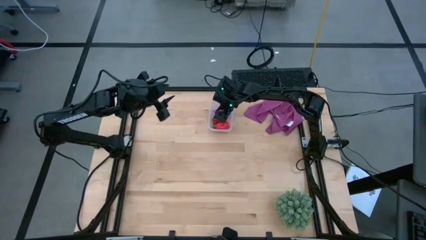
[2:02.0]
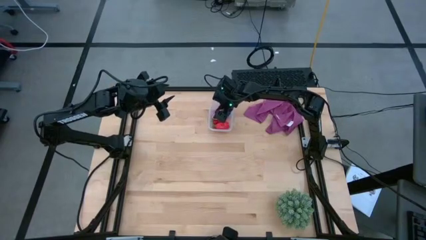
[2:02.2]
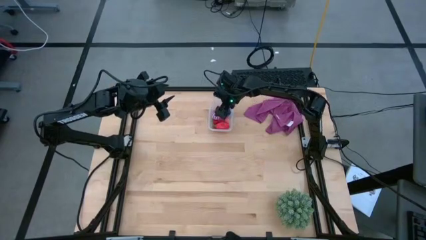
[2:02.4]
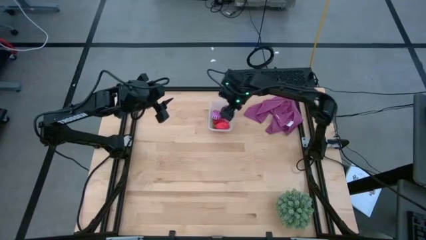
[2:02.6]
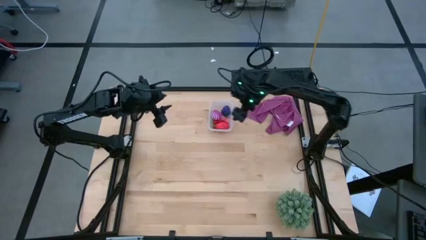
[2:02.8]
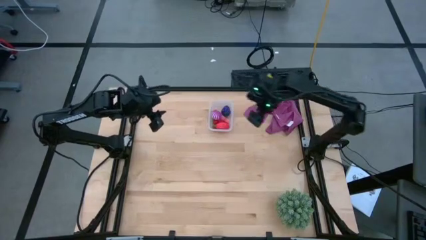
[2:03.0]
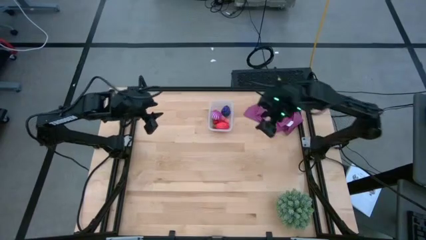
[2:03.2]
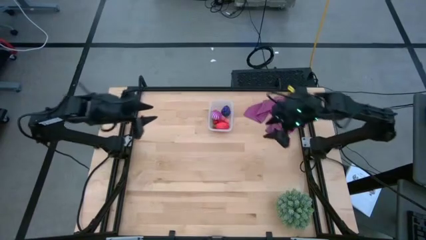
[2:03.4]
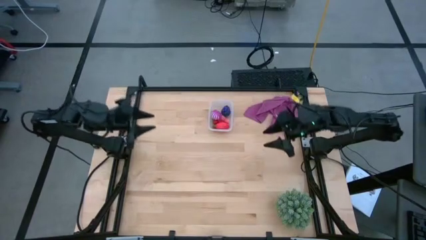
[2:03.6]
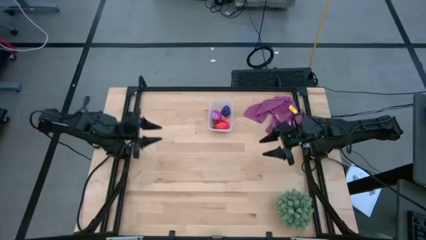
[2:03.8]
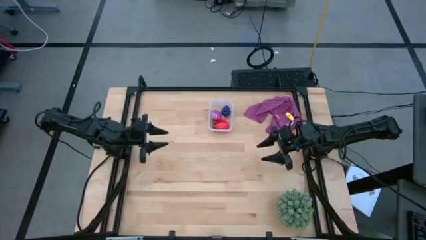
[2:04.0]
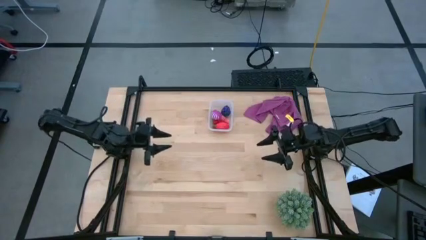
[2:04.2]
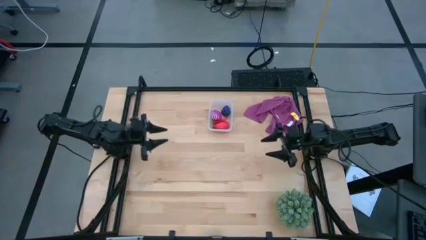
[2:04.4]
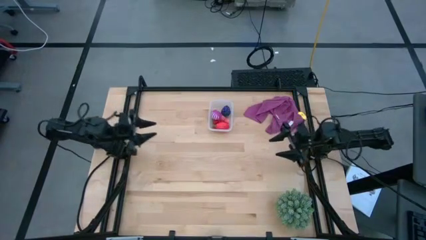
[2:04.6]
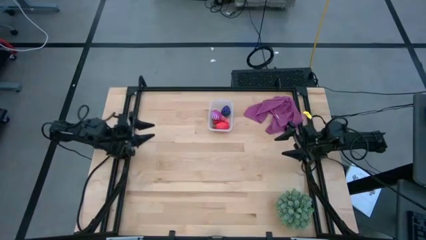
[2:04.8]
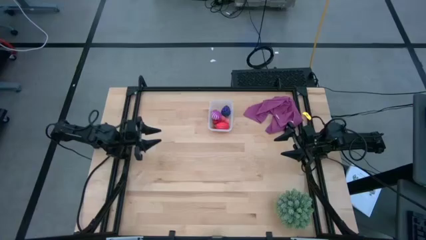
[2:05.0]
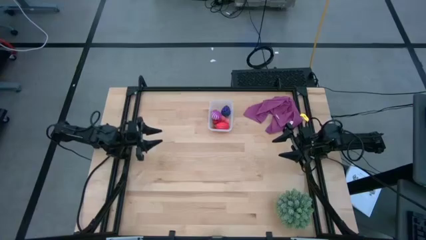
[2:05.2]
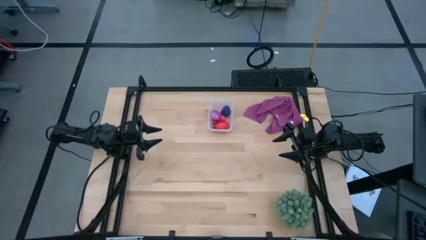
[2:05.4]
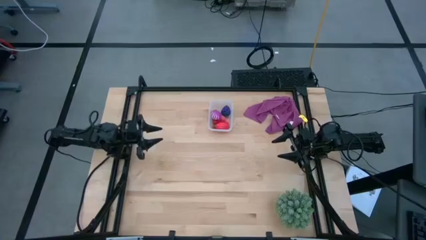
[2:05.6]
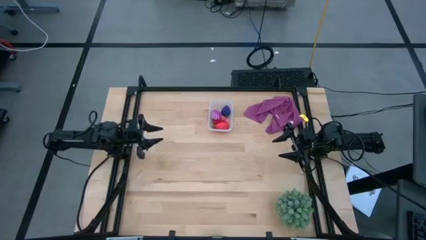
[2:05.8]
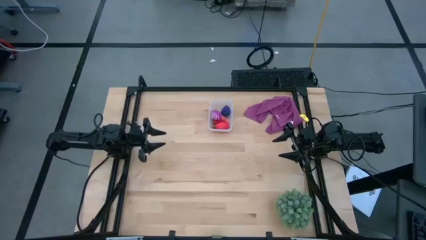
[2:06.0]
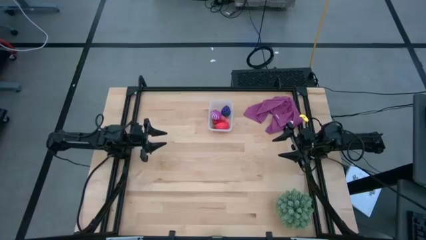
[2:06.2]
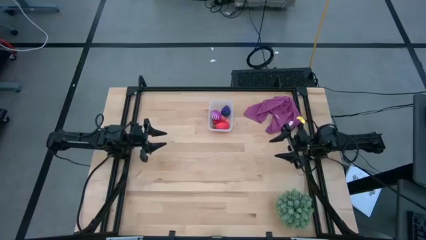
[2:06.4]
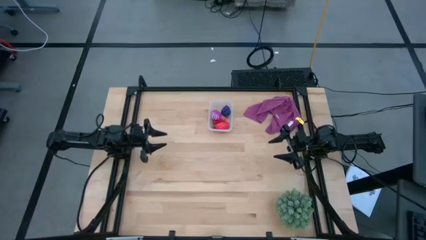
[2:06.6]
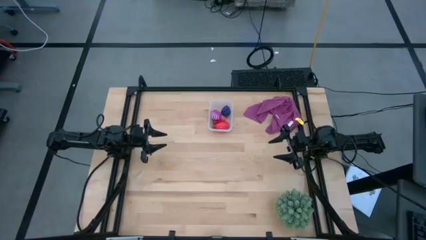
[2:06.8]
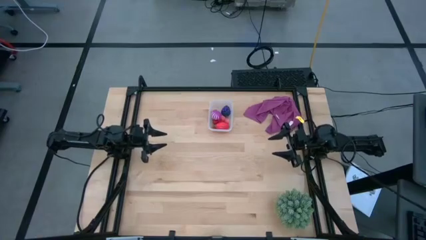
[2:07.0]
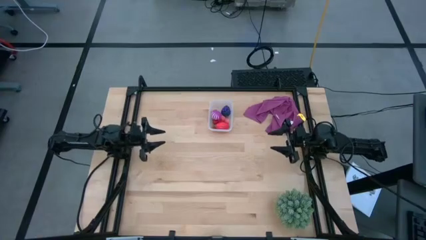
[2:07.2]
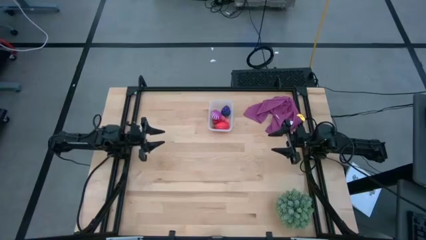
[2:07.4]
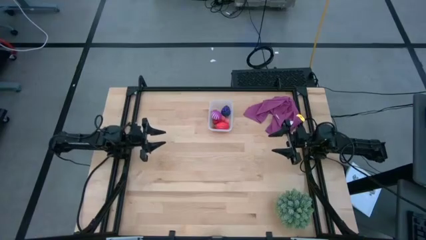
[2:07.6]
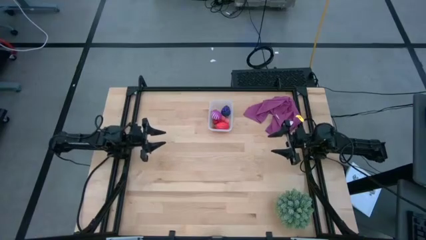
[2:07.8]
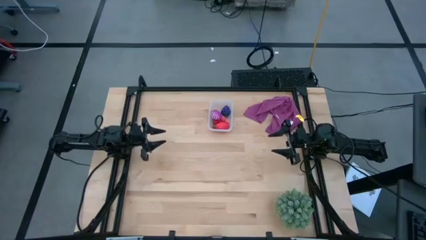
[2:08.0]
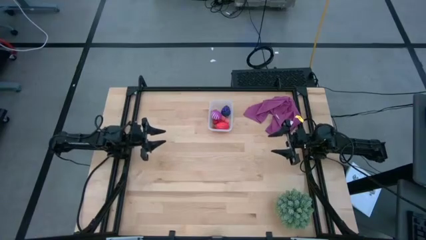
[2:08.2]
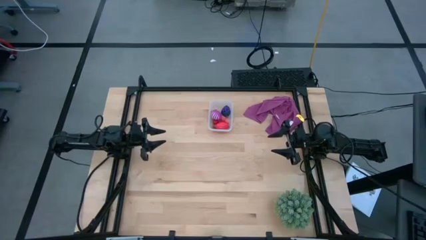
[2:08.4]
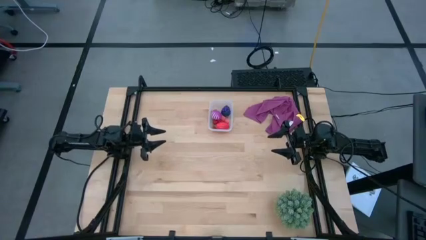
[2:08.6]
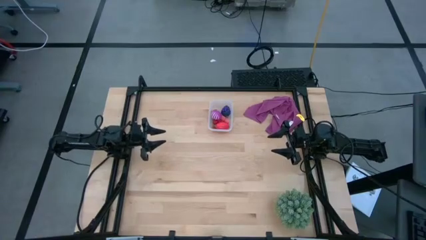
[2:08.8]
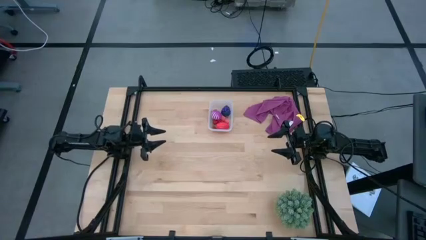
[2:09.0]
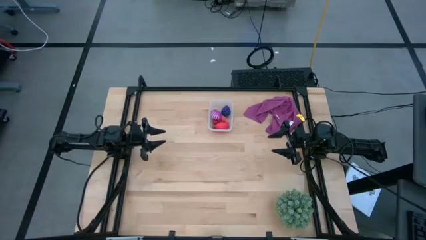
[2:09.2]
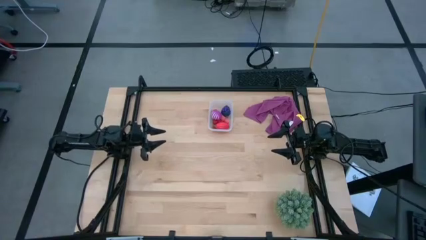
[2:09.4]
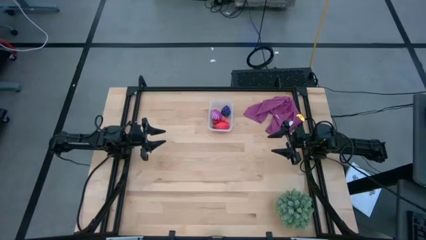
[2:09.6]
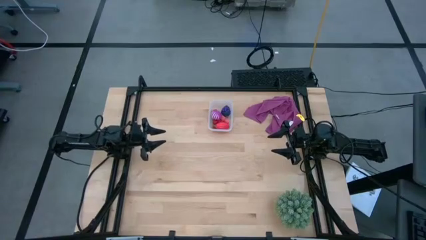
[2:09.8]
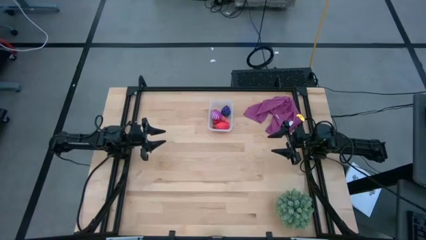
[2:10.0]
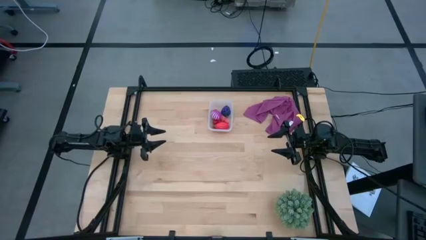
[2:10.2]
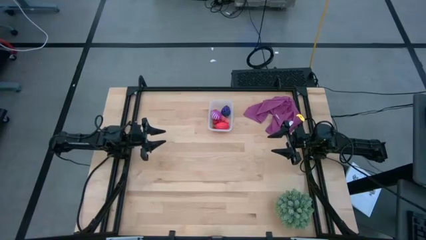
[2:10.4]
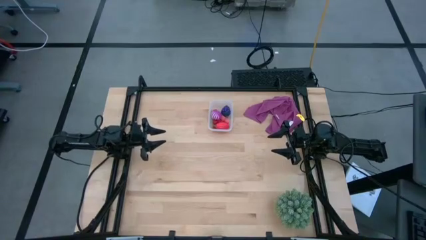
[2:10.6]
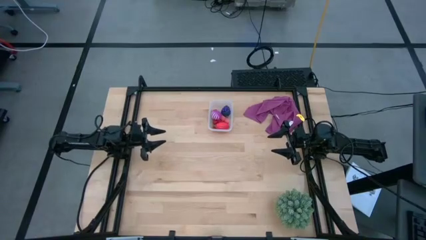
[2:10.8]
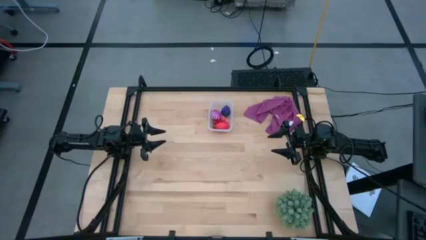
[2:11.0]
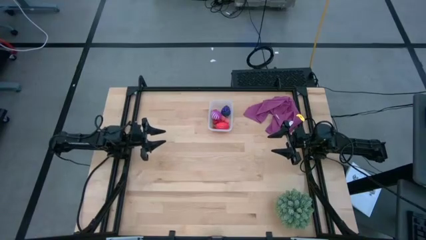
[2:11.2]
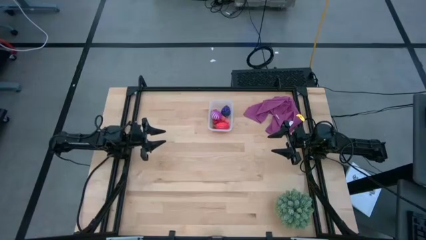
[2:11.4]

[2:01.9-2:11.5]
Task: Pick and placing Produce into tupperware
Return to Home Position

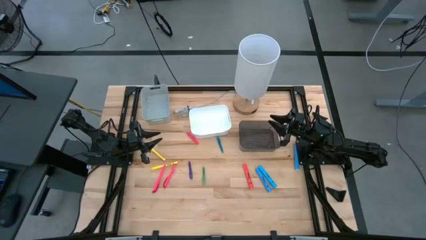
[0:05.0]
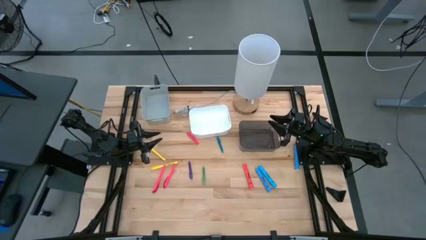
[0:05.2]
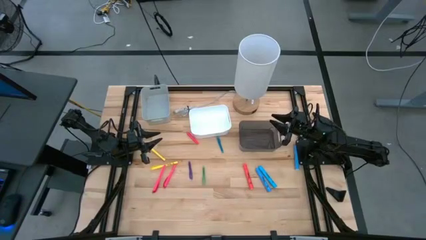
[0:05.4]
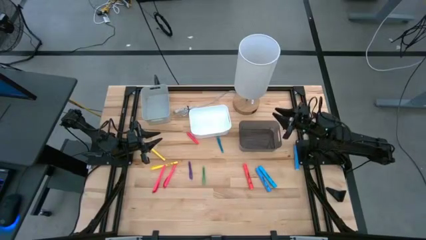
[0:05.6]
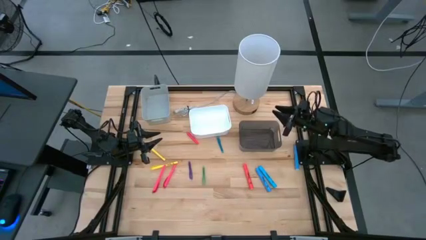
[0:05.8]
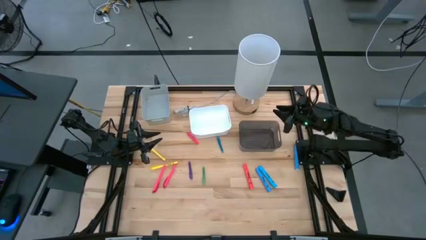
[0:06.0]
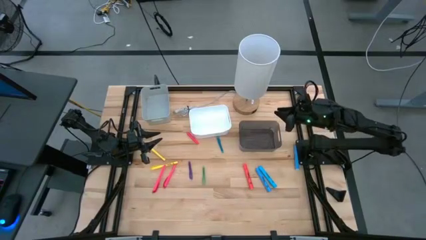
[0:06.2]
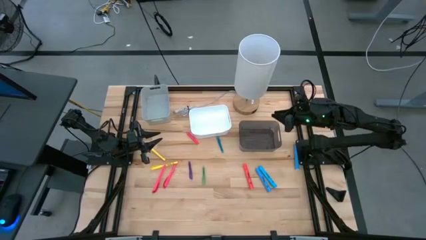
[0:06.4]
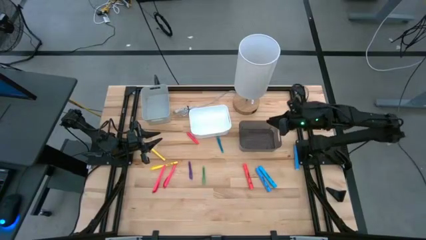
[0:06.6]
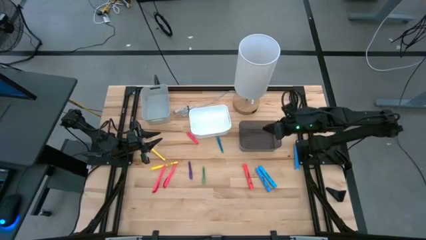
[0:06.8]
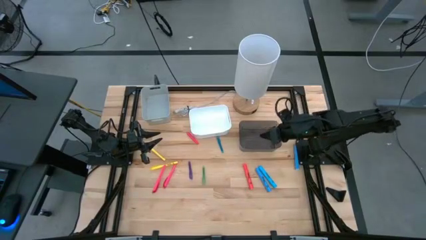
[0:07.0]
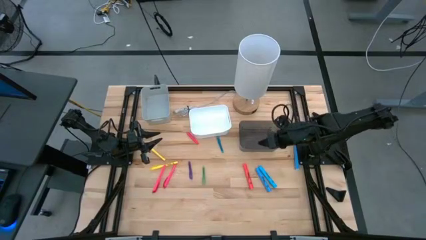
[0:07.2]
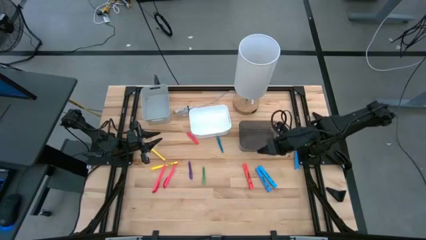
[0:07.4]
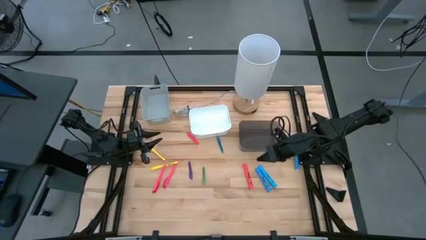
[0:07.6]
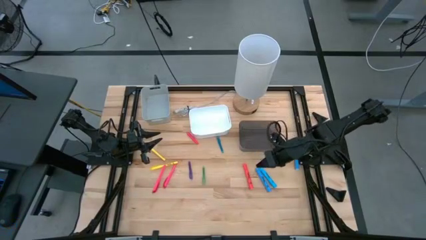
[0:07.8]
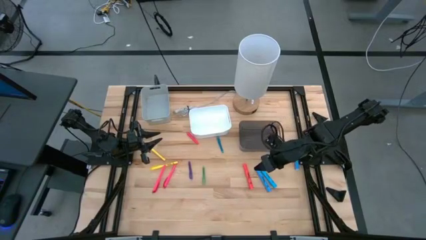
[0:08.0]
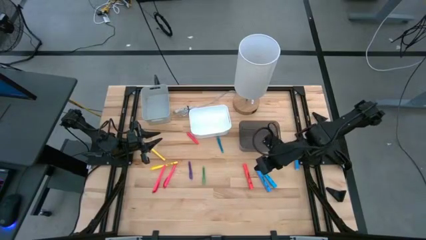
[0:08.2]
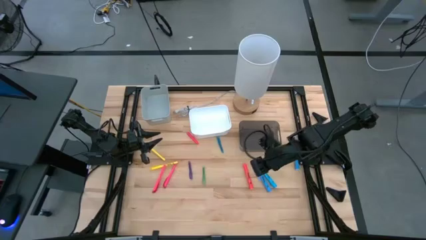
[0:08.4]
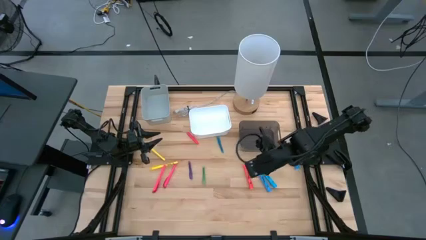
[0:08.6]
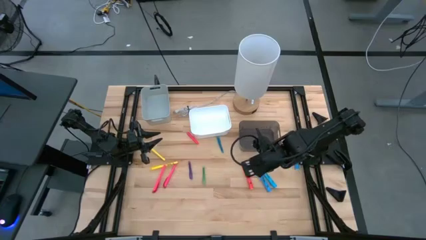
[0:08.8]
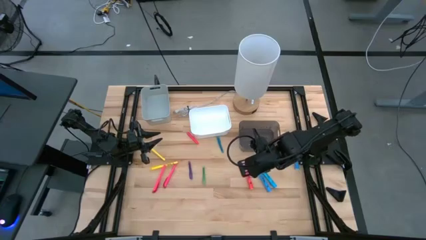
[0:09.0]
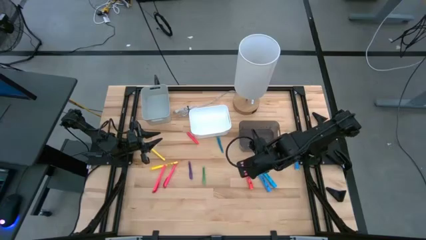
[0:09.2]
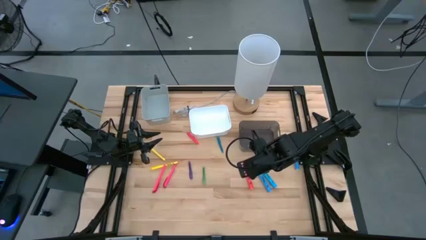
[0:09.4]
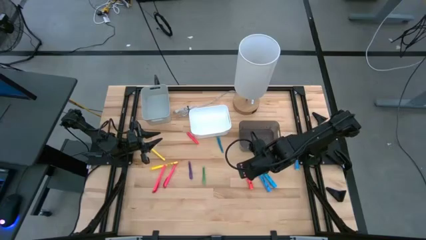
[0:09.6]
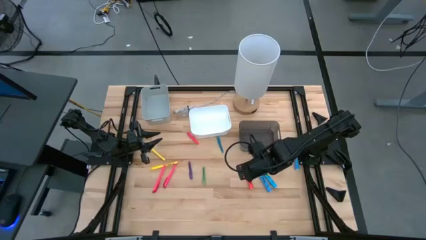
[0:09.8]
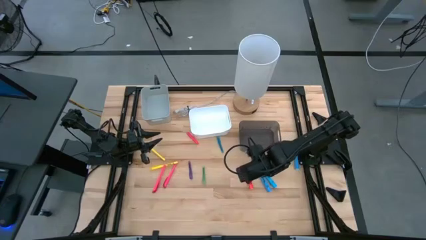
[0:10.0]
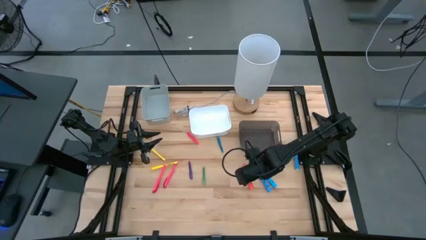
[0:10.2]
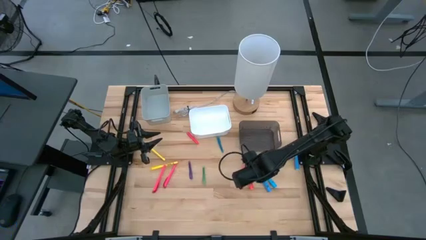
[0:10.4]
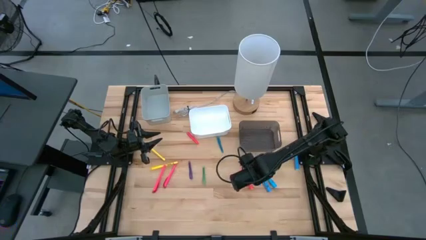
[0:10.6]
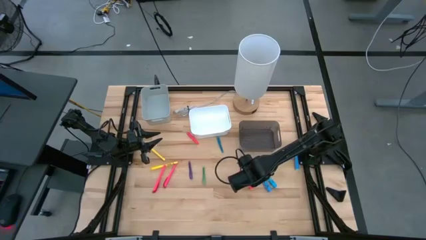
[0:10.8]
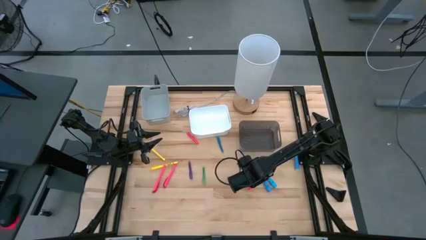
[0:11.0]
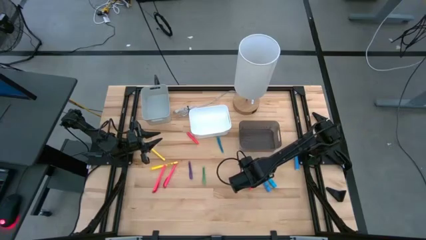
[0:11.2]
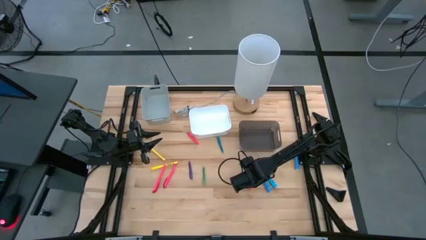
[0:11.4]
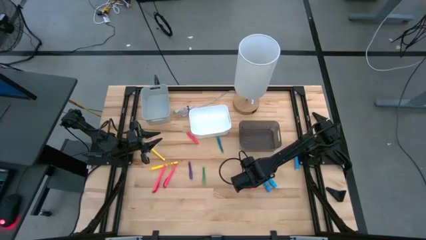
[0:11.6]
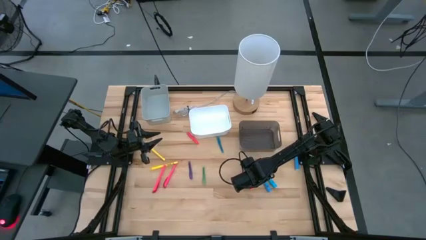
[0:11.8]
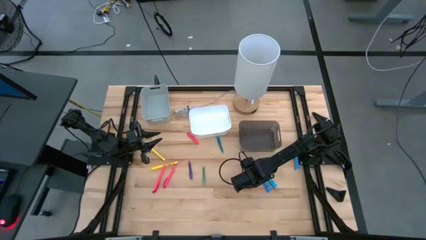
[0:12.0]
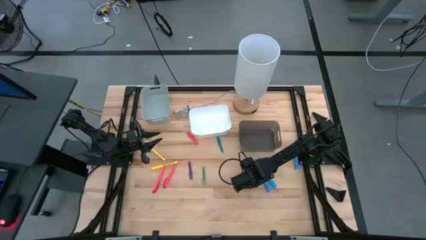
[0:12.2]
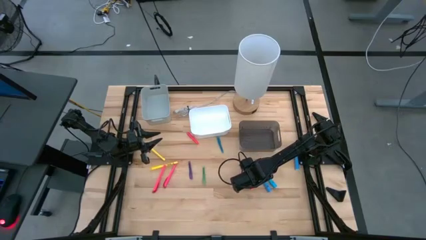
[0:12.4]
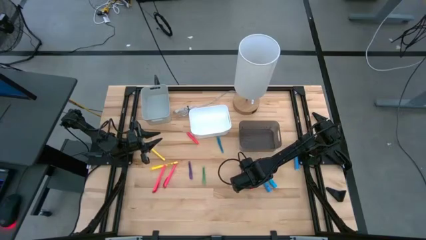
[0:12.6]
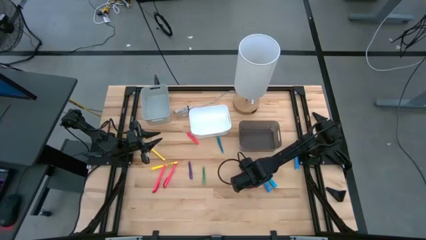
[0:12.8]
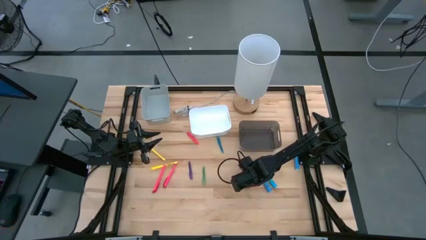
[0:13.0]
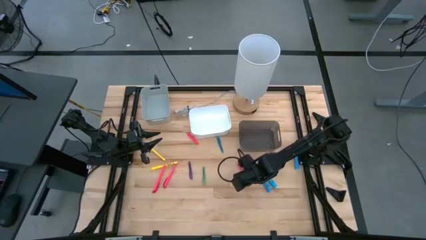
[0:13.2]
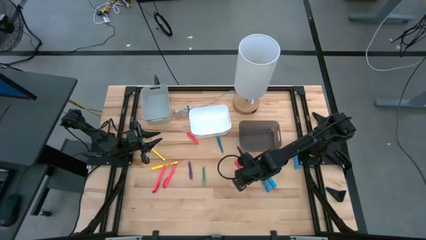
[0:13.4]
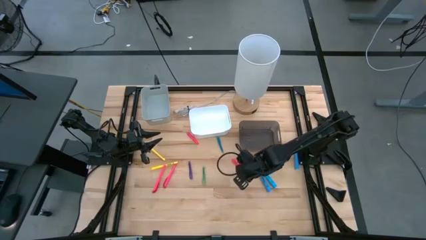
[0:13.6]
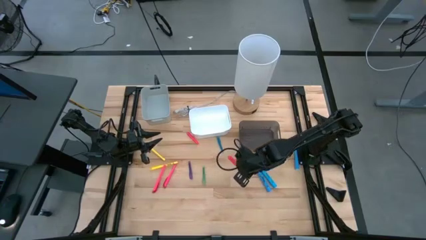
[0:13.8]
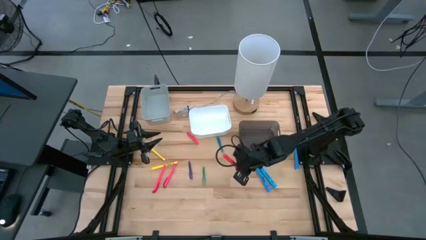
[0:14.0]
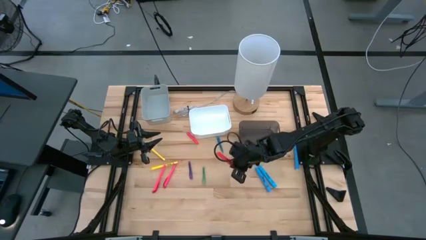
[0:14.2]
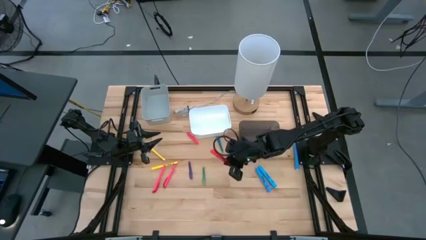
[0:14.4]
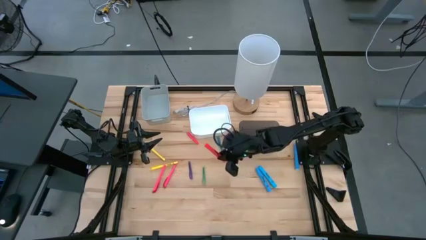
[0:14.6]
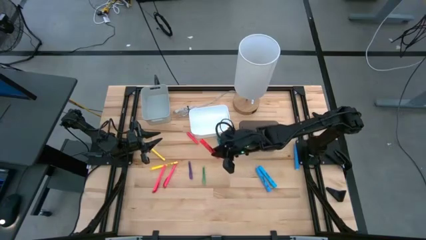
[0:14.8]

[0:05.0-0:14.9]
Task: Pick & Place Markers
Put the orange highlighter pen into the gray bin
